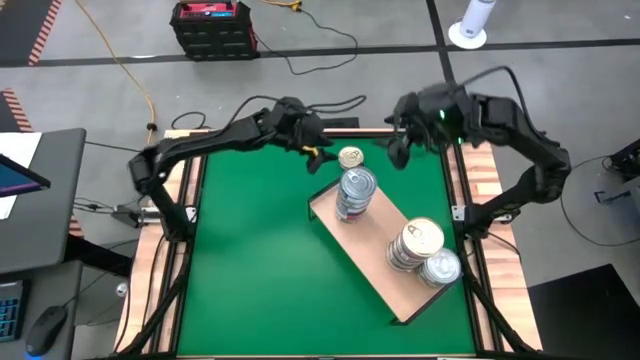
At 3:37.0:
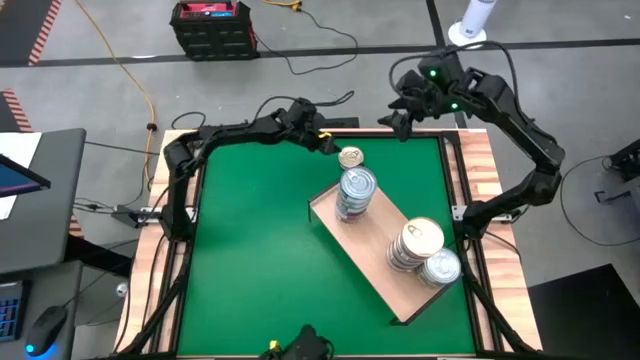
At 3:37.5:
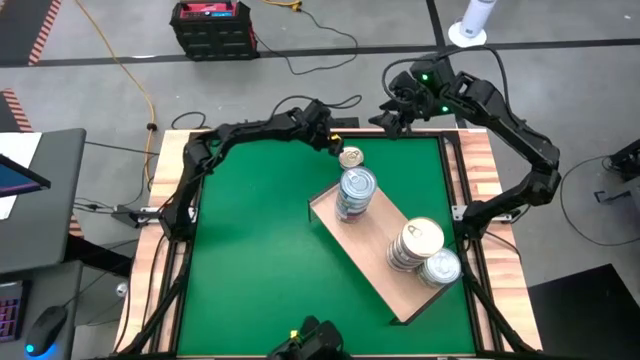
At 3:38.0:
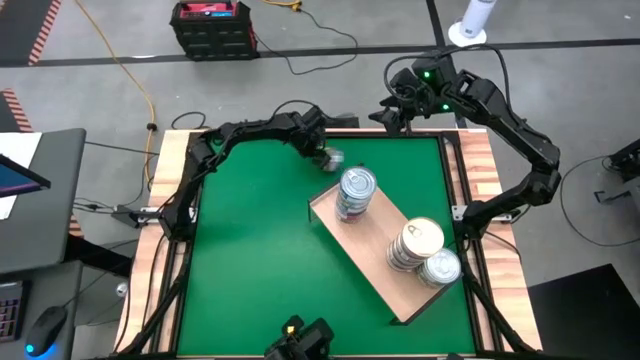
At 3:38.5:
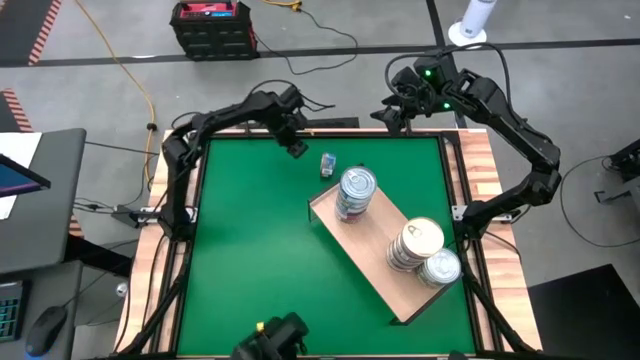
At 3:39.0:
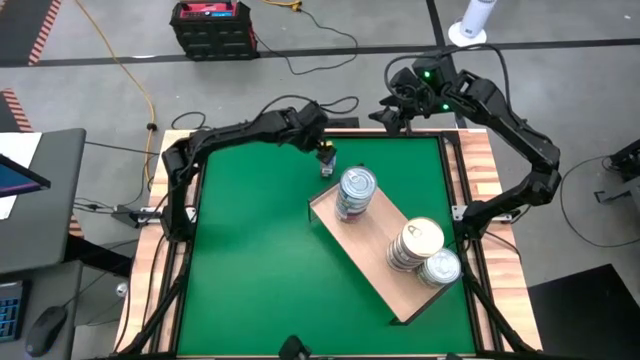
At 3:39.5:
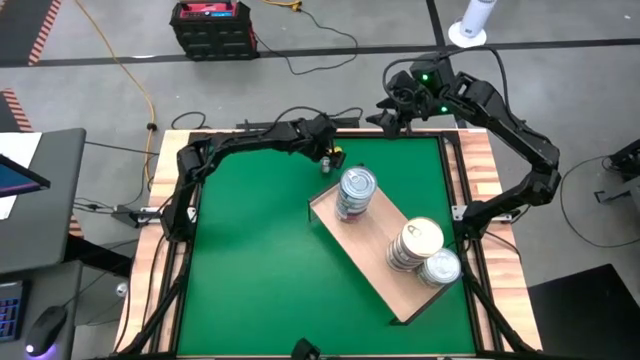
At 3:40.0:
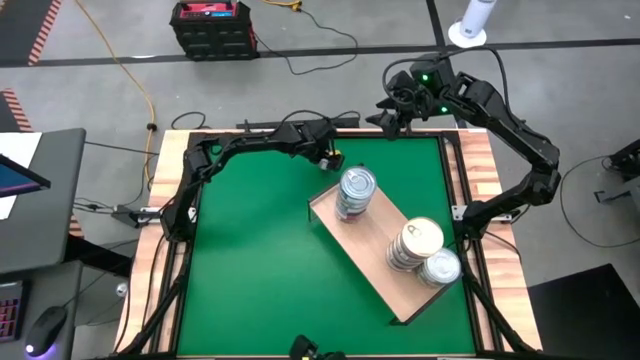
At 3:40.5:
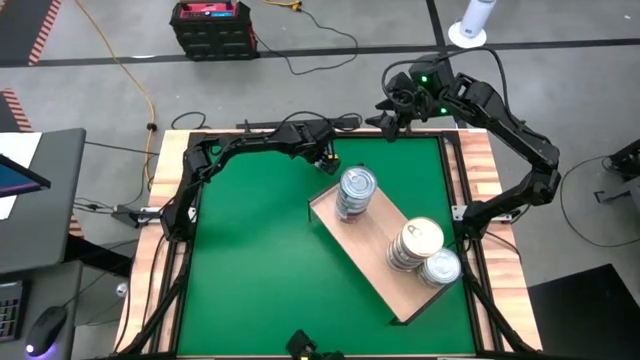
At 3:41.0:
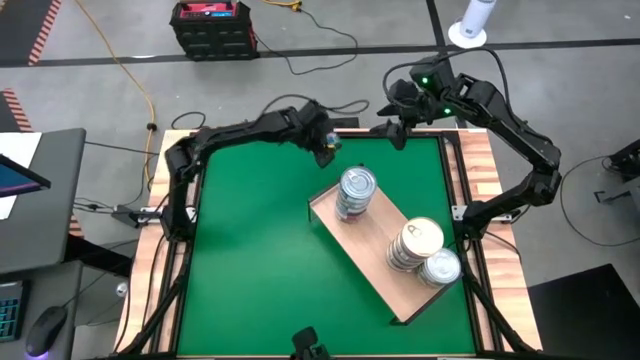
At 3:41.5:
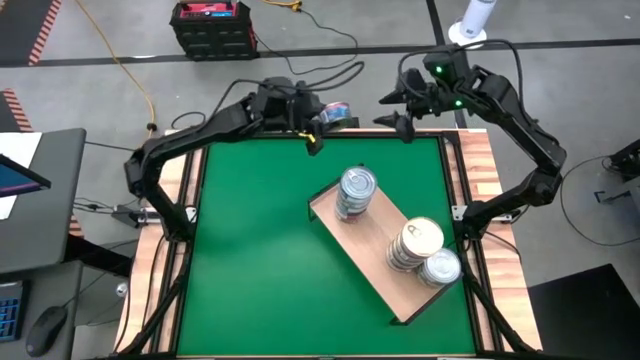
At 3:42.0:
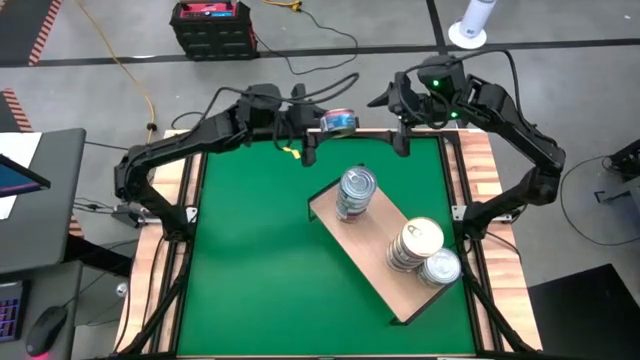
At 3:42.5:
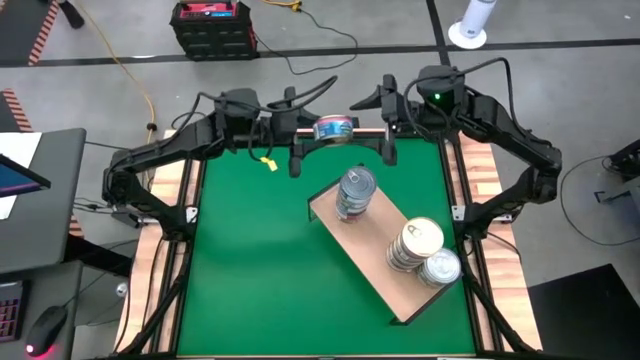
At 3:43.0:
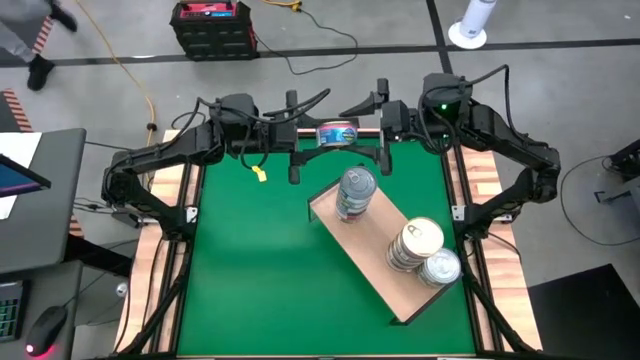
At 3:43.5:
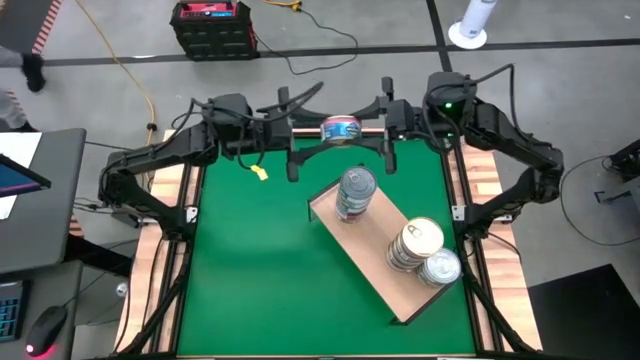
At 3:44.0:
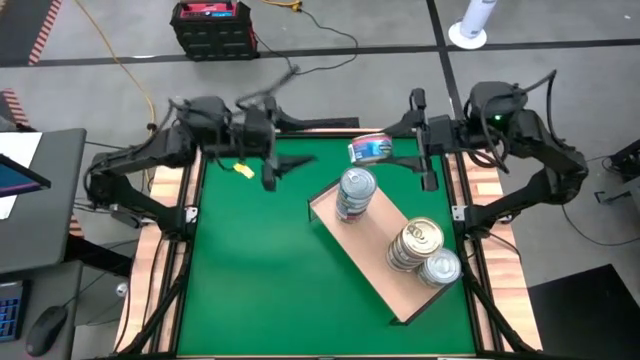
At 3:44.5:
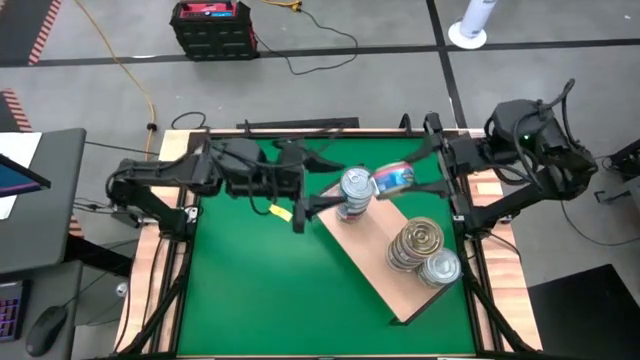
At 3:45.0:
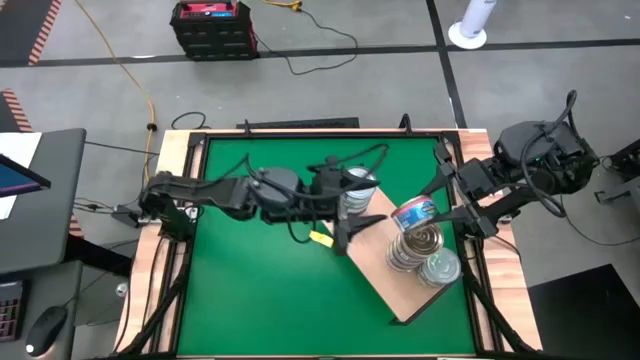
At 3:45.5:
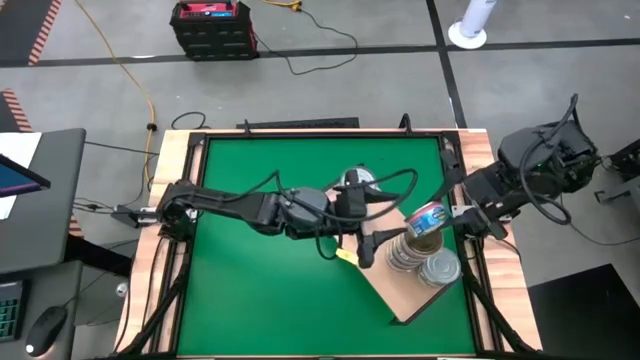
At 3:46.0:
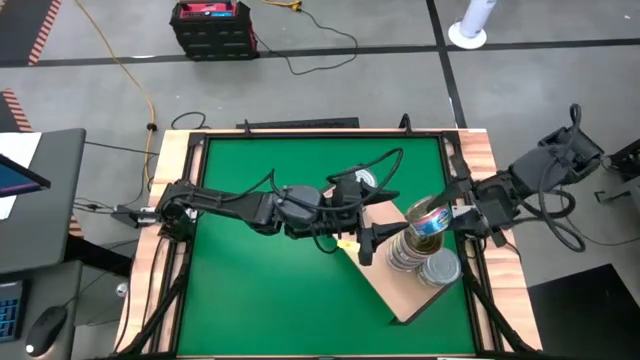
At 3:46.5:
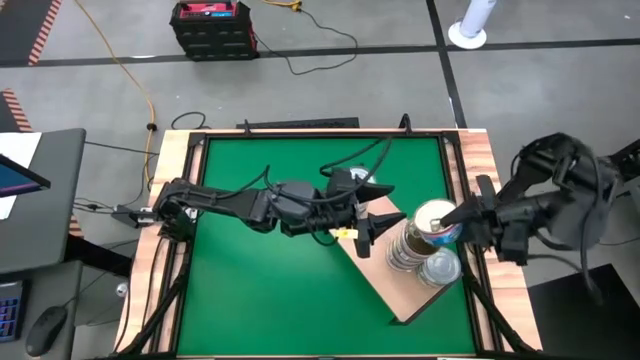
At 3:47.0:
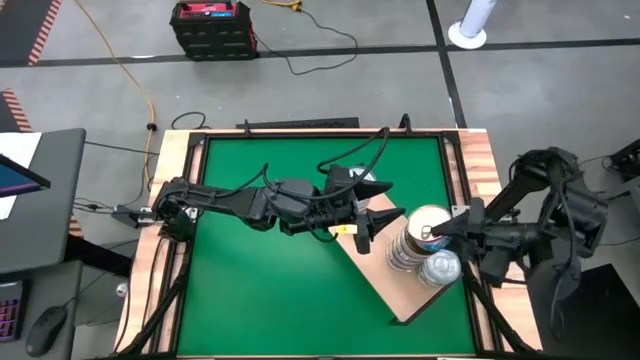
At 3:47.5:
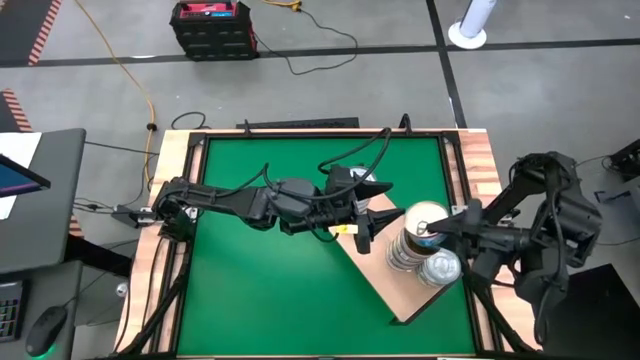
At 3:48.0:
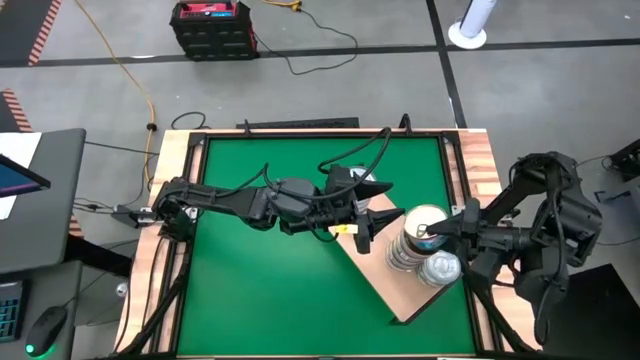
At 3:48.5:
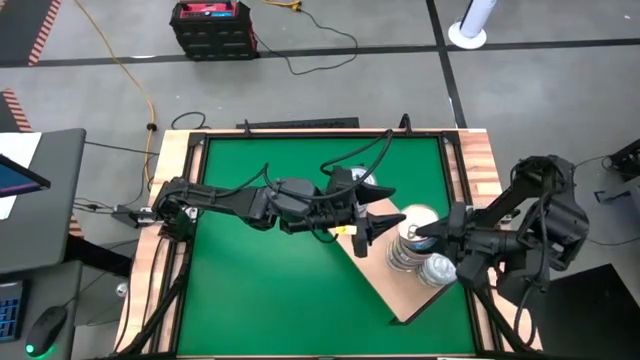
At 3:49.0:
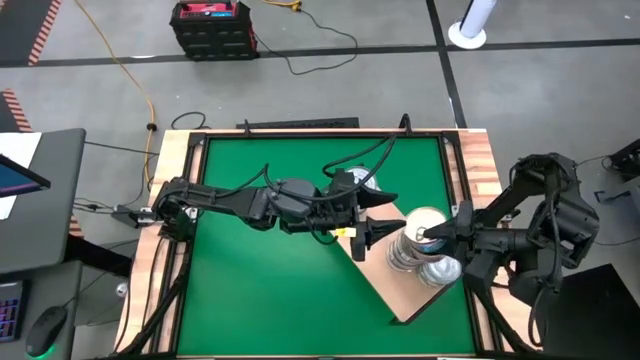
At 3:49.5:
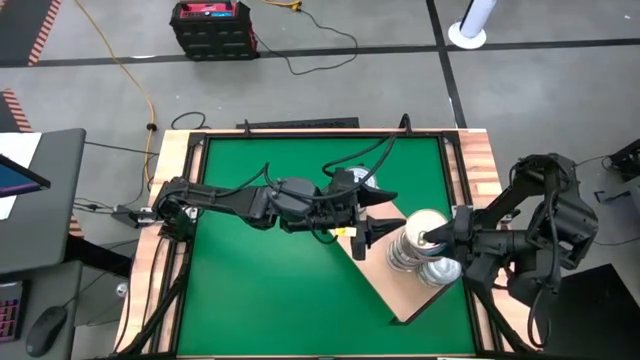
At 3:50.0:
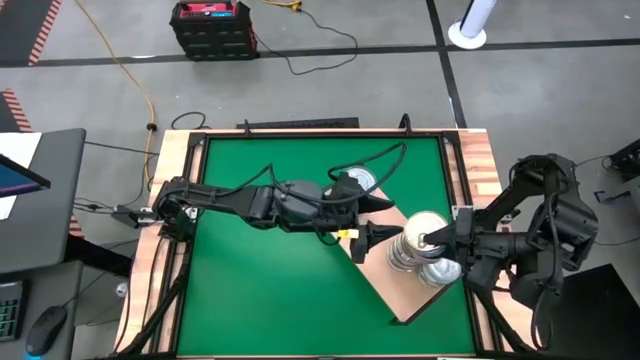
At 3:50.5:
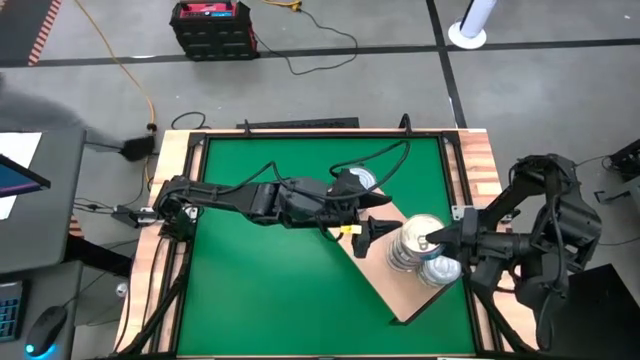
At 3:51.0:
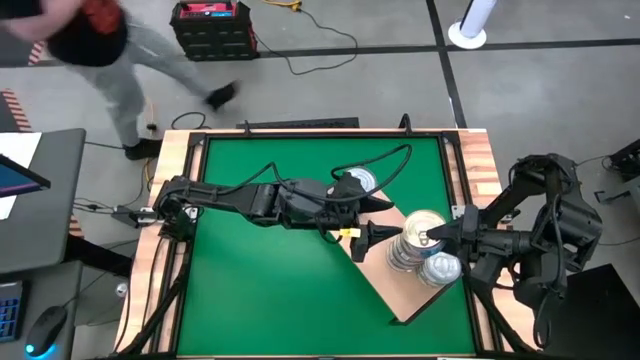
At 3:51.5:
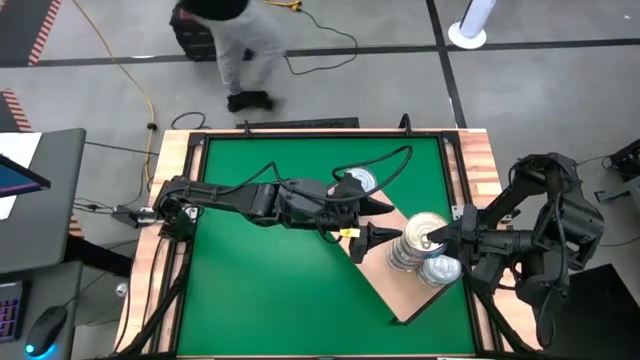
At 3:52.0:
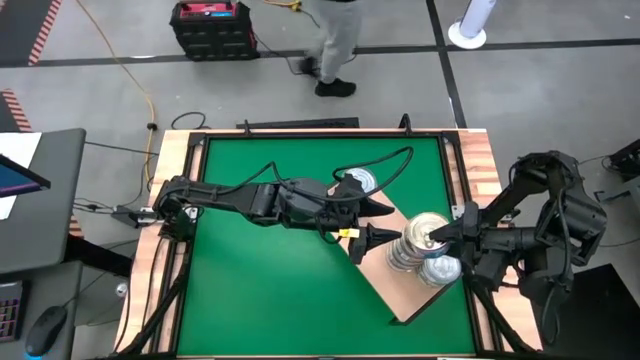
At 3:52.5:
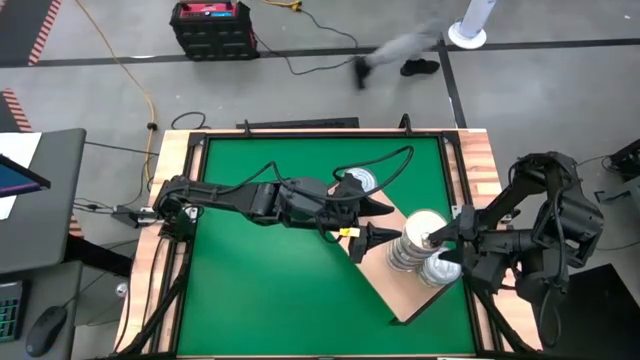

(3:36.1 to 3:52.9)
Task: Stack canned seafood by type on shelf
Stack the blue and pink tuna can on top of the other blue and pink tuna cans on the shelf

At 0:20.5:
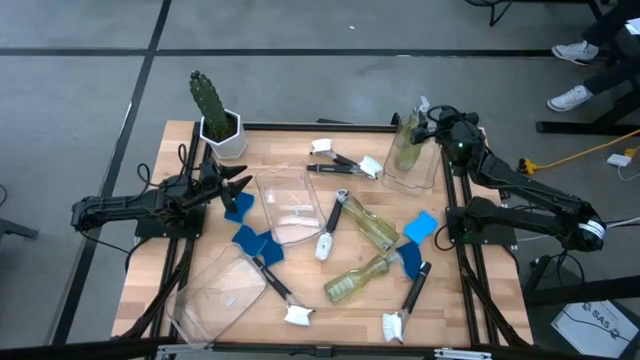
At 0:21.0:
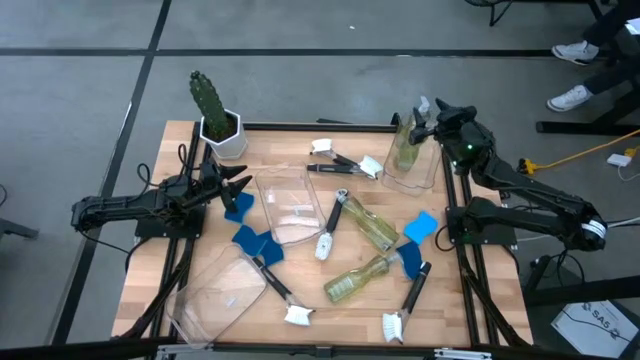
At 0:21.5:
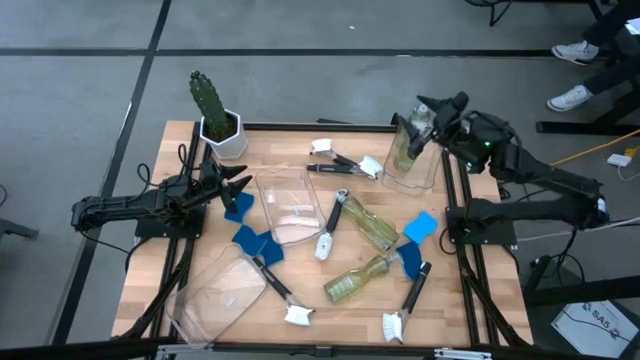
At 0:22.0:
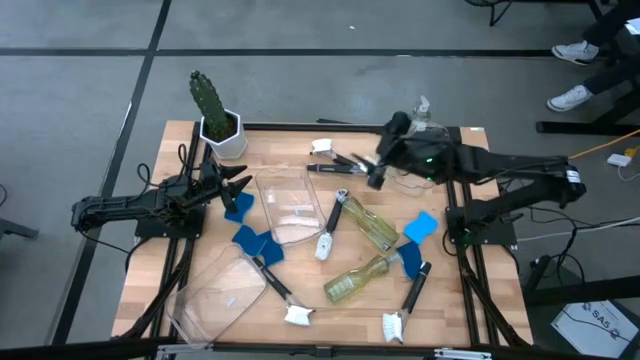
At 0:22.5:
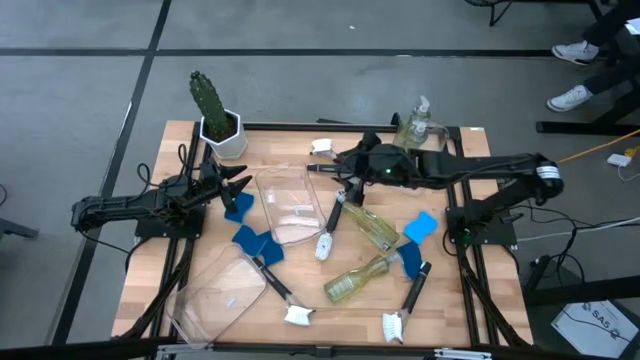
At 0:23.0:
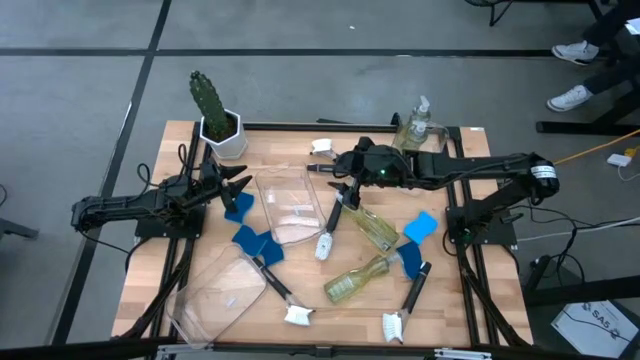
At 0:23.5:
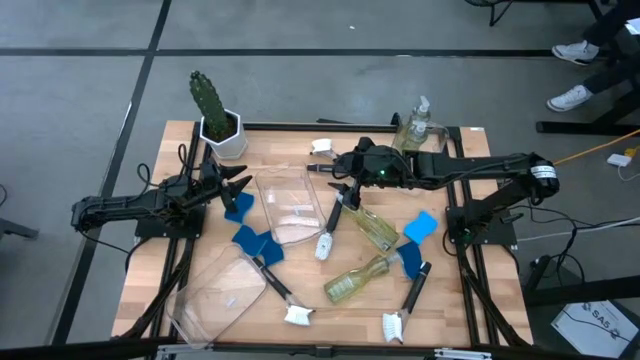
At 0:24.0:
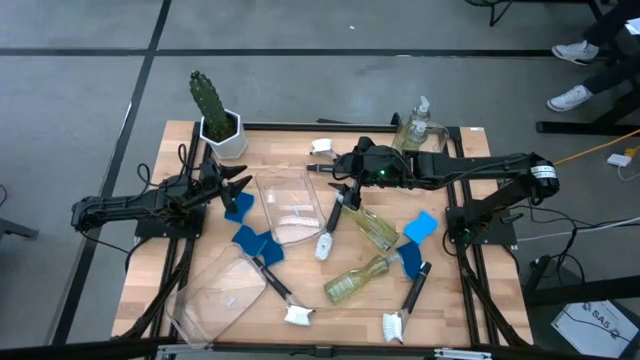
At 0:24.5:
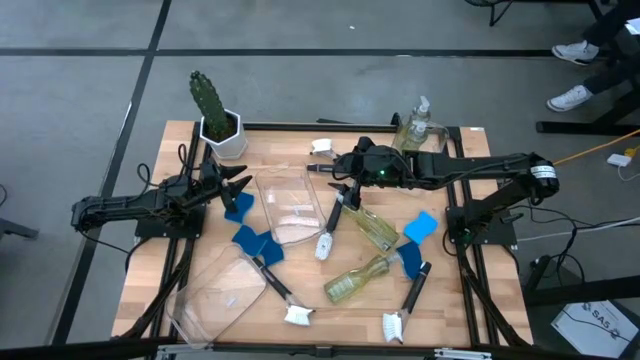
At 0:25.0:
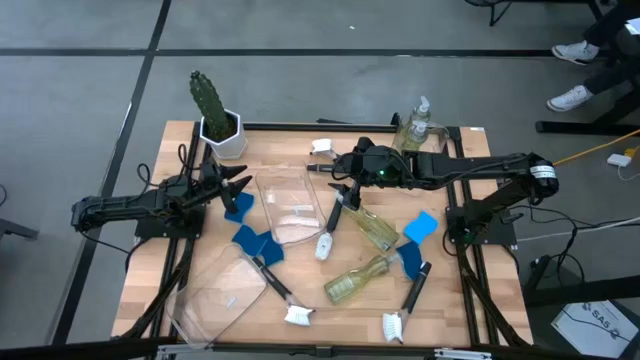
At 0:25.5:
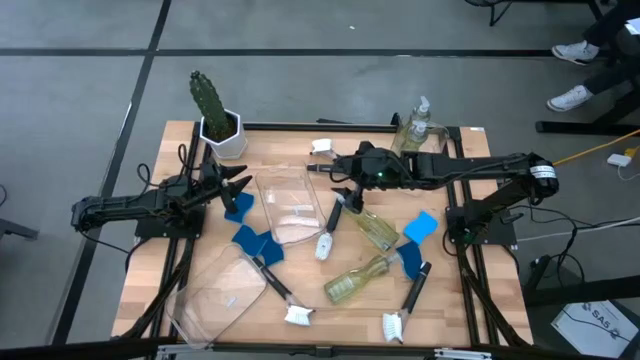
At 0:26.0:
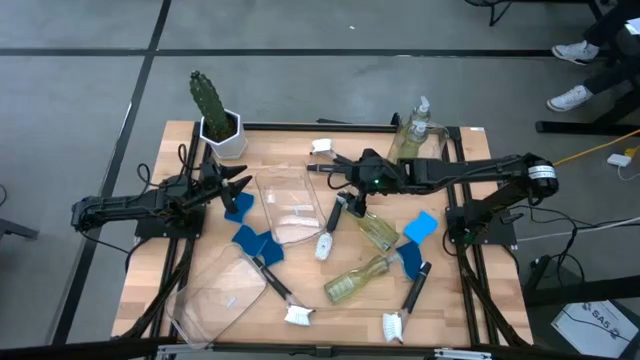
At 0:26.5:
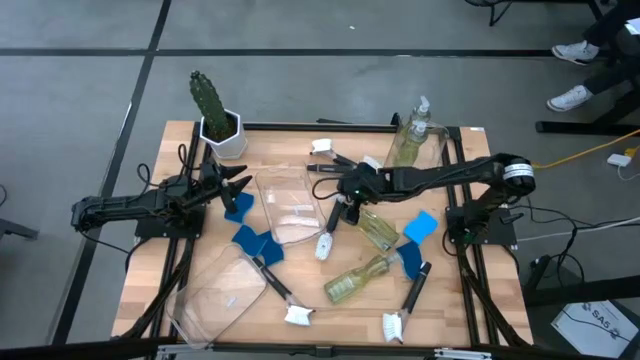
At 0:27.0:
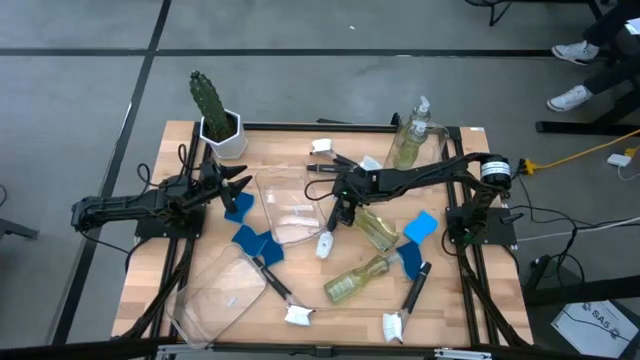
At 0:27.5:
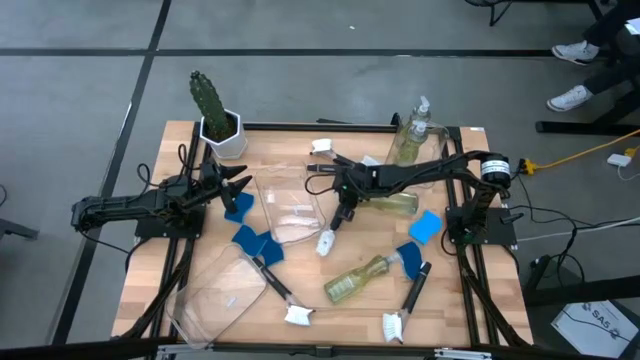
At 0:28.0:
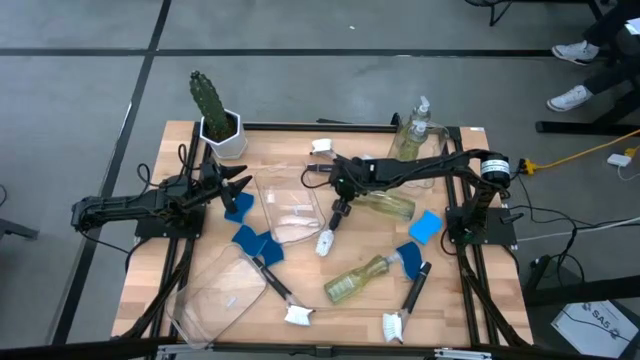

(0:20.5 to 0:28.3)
Task: Pick & Place Kitchen Sink Supplies
Put the green dish soap into the top right transparent bin
